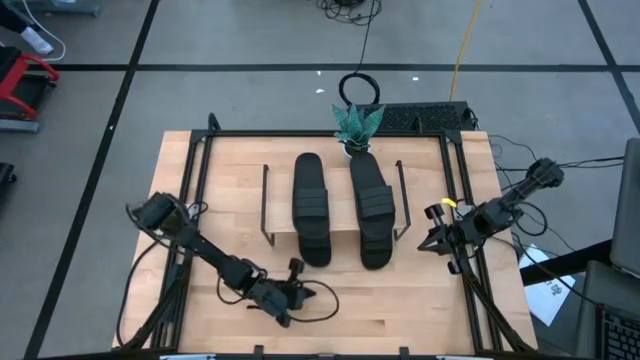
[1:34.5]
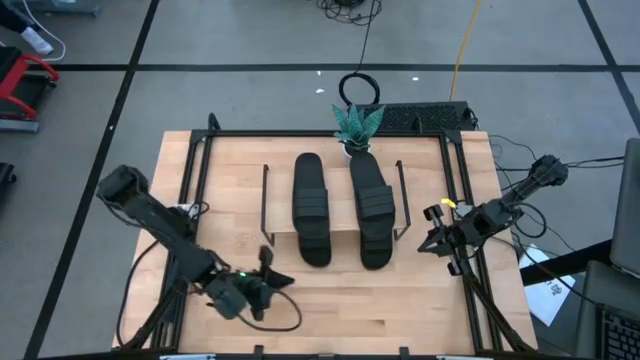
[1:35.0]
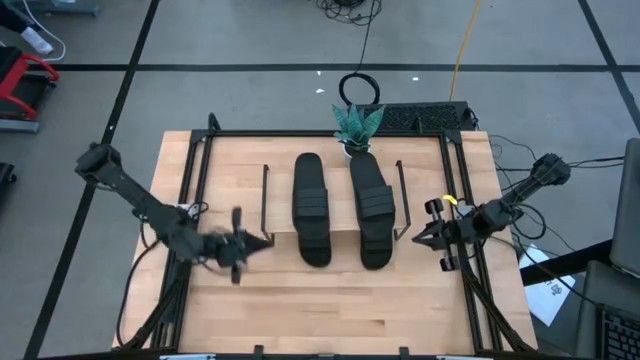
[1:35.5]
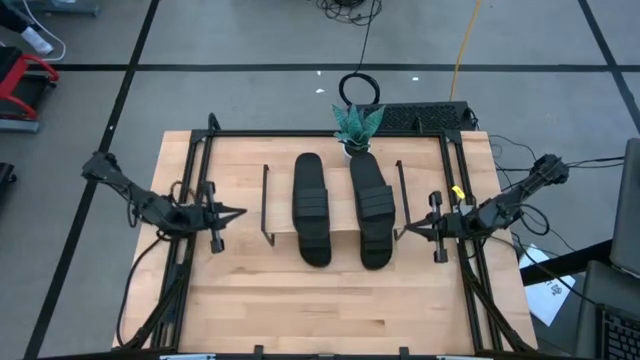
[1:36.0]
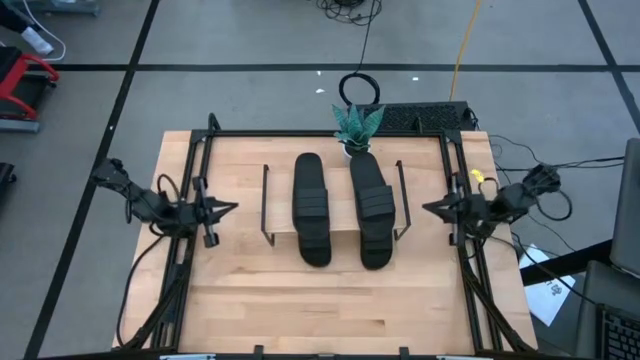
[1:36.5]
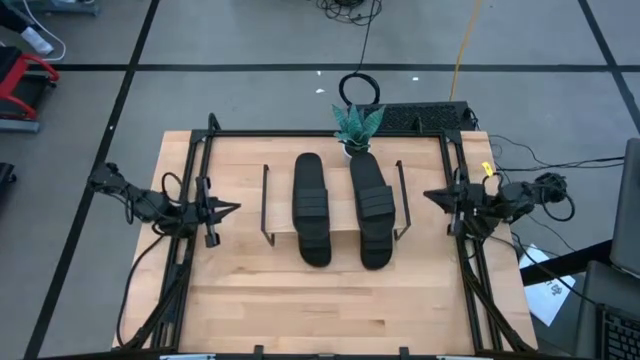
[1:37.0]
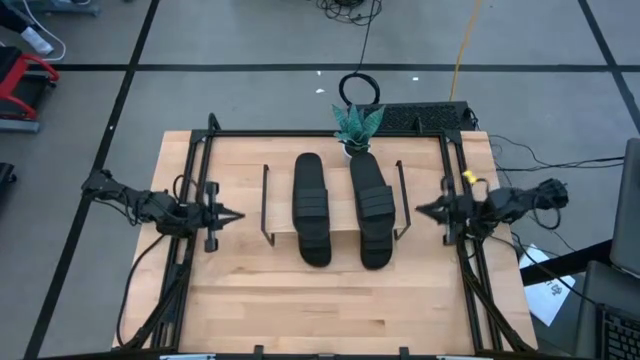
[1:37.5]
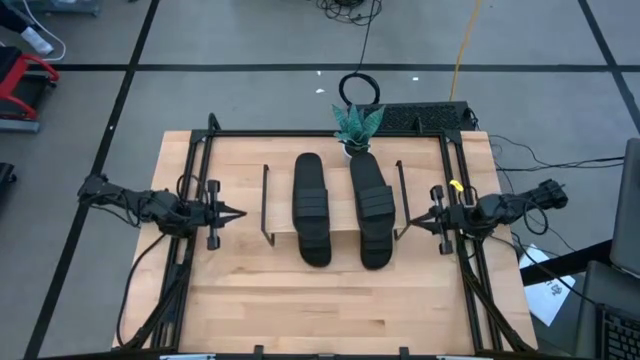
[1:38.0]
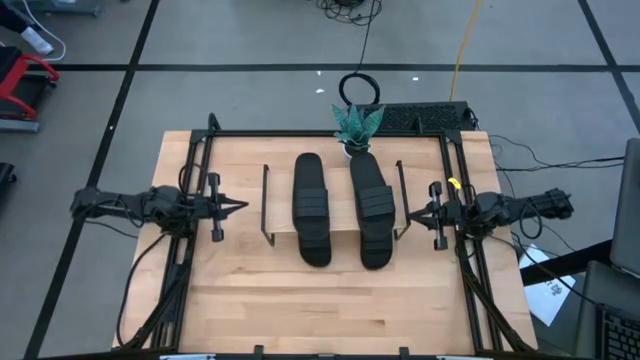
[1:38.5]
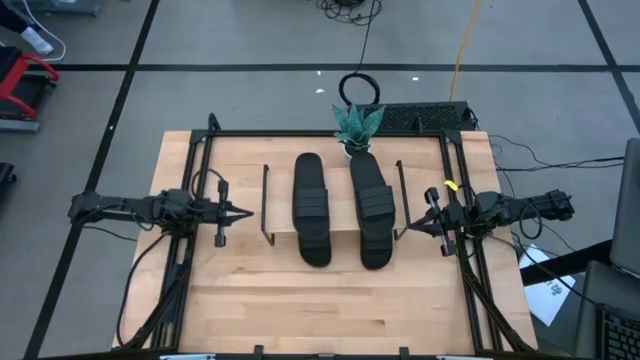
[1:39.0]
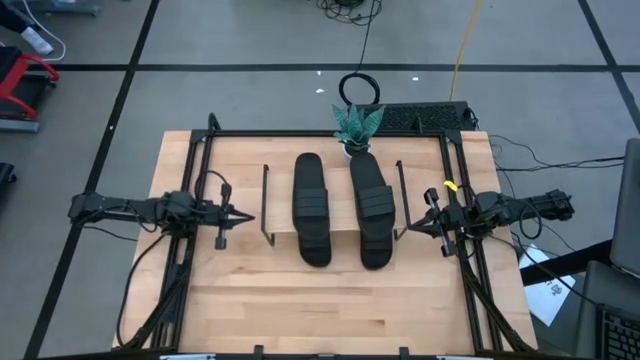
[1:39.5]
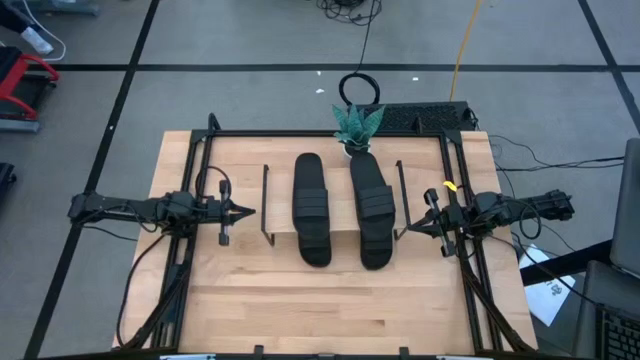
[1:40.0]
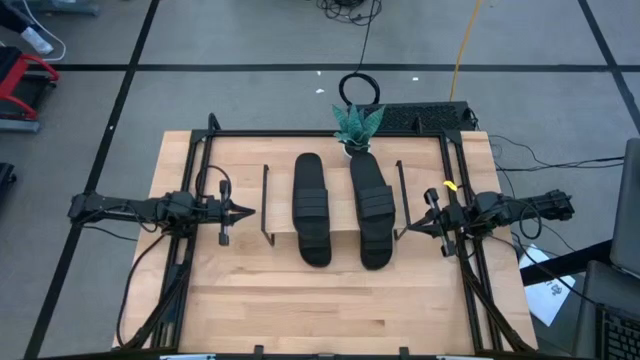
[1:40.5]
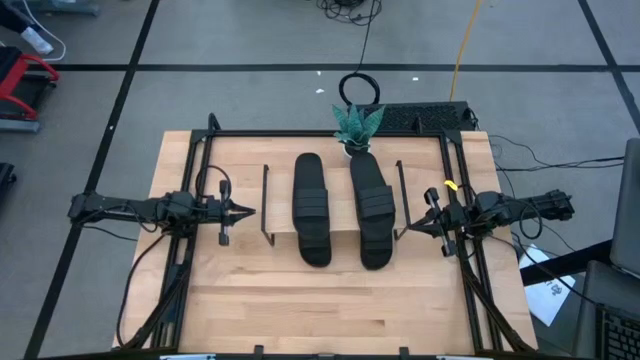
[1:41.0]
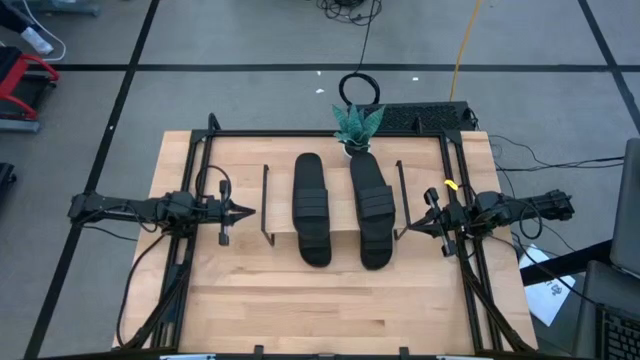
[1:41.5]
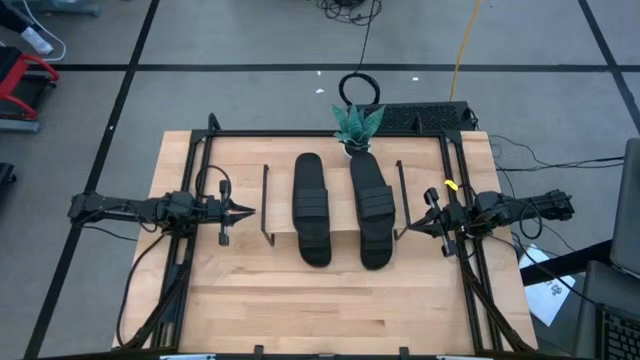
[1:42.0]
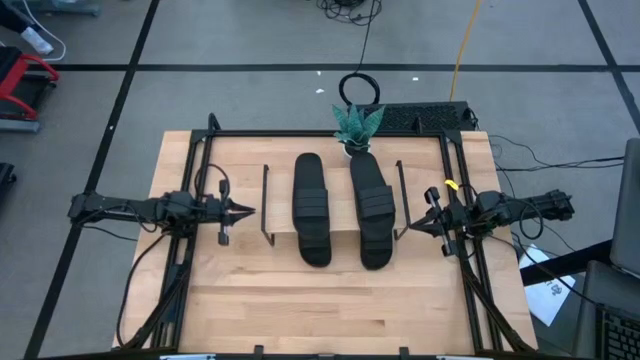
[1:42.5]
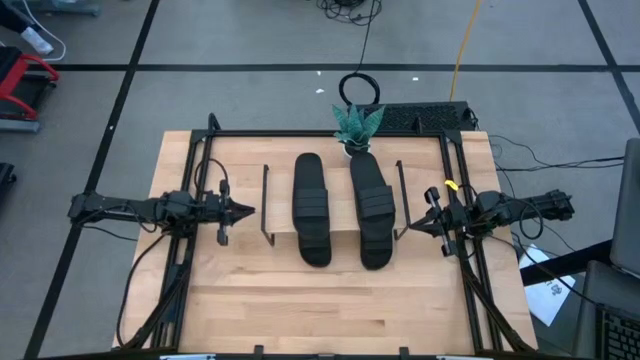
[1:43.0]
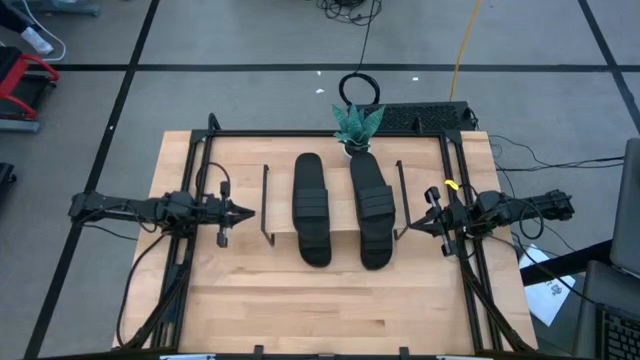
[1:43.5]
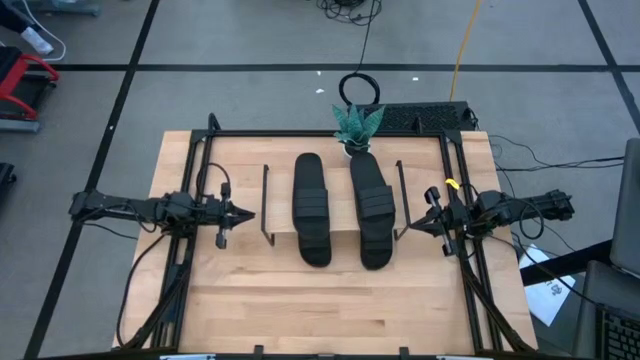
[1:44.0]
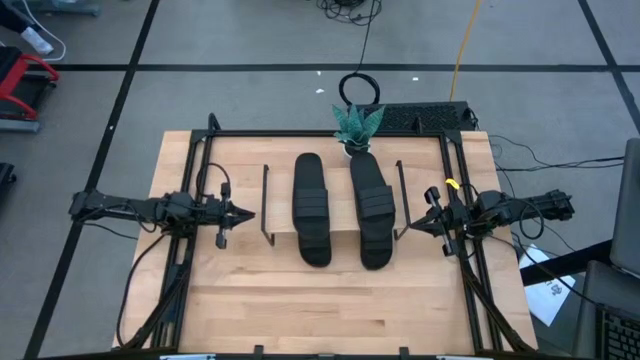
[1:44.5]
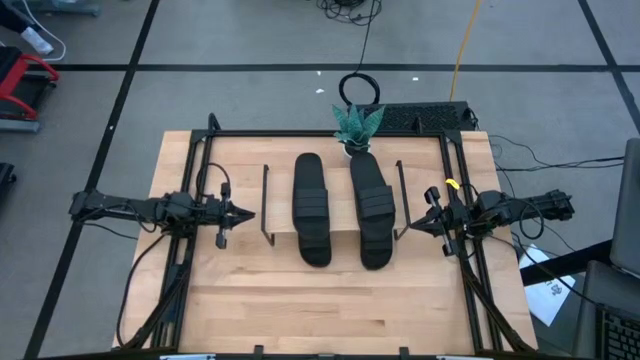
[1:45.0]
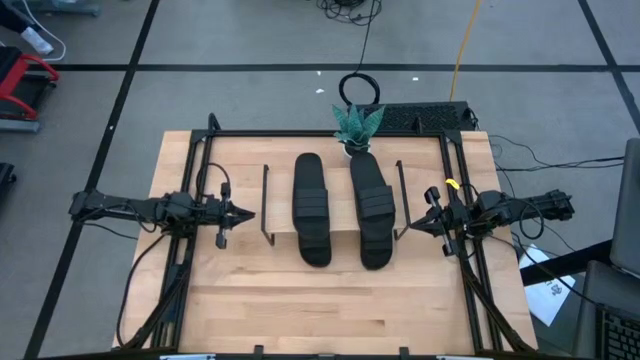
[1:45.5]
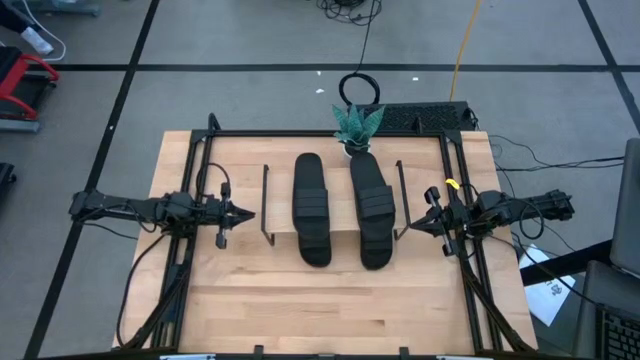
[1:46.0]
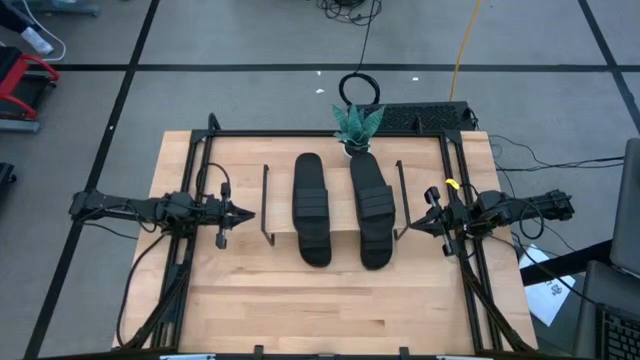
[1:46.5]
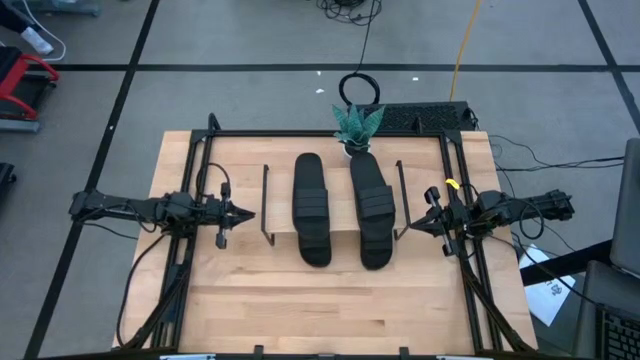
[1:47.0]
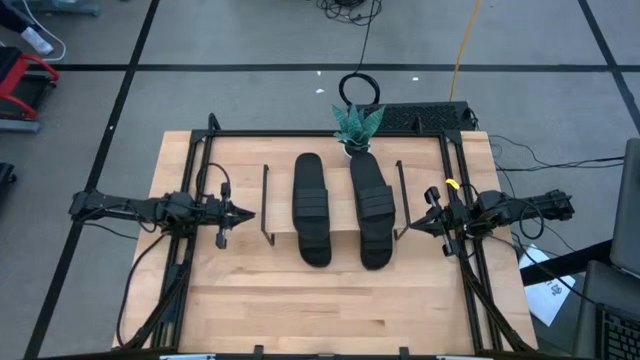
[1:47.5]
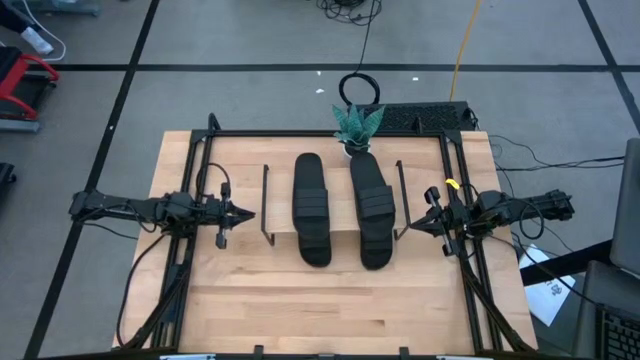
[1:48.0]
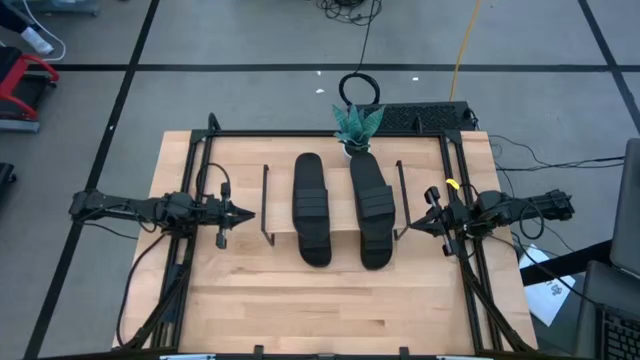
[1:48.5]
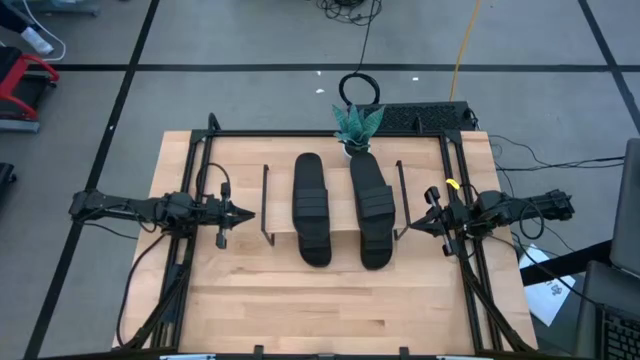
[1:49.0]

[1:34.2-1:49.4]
Task: Pick and place slides into the shelf
Return to Home Position

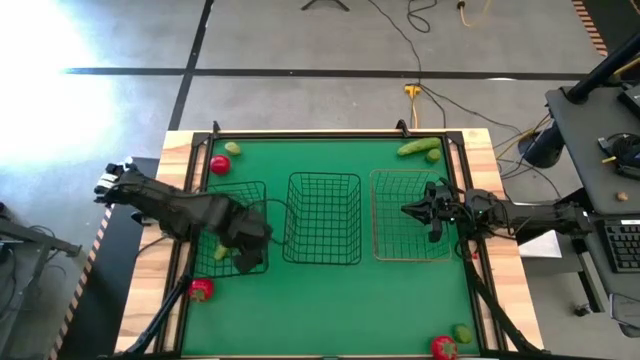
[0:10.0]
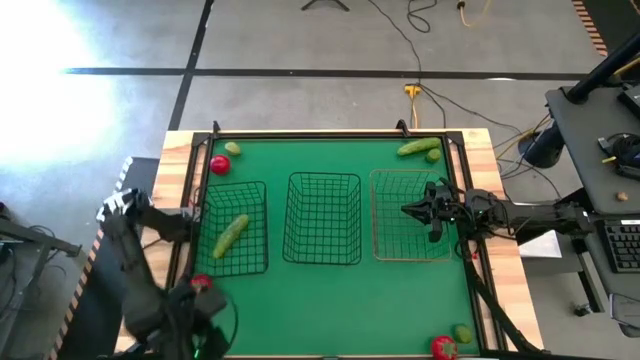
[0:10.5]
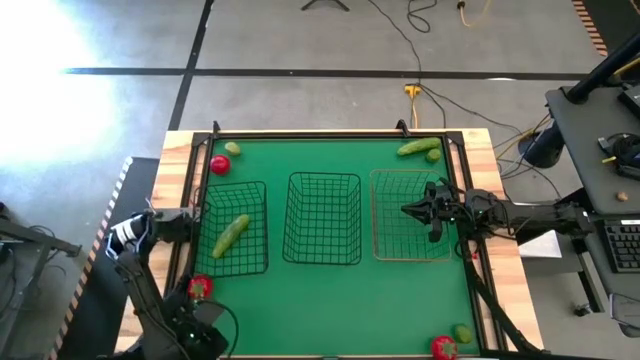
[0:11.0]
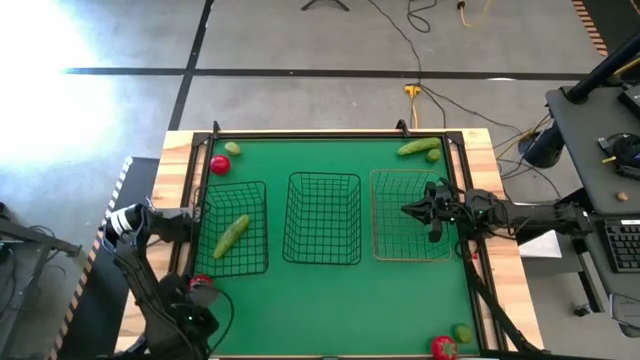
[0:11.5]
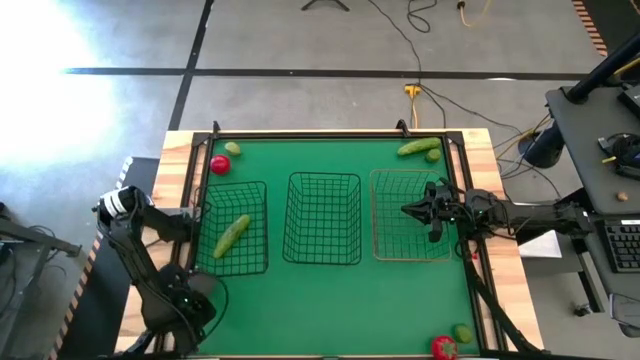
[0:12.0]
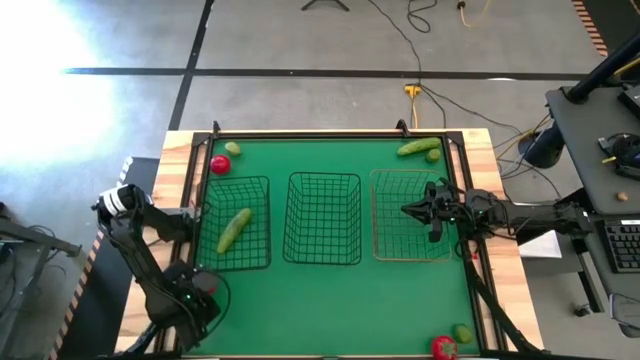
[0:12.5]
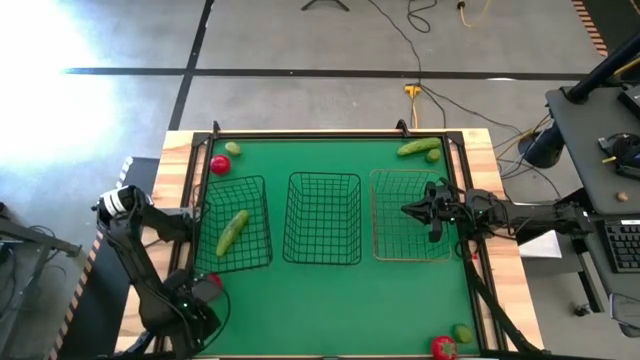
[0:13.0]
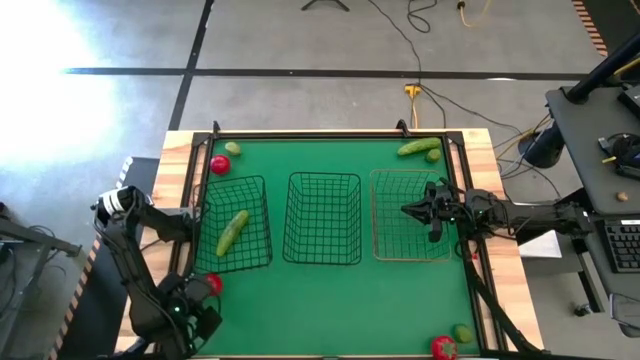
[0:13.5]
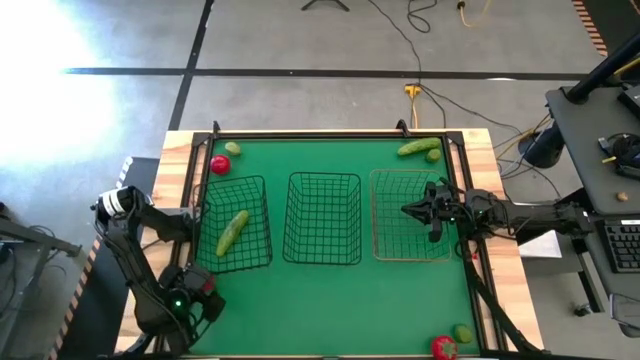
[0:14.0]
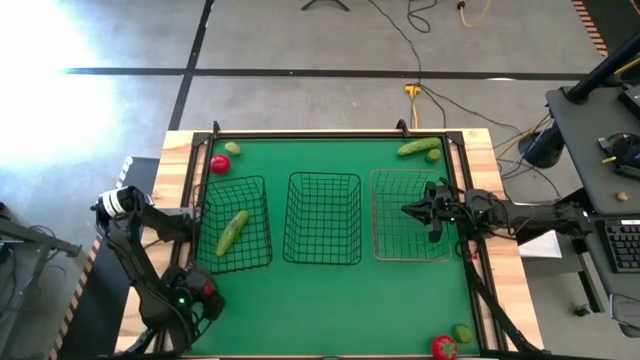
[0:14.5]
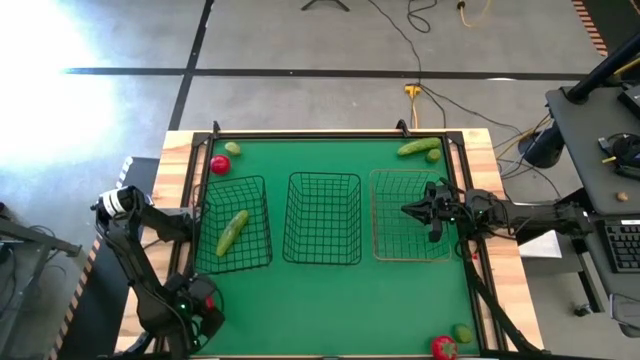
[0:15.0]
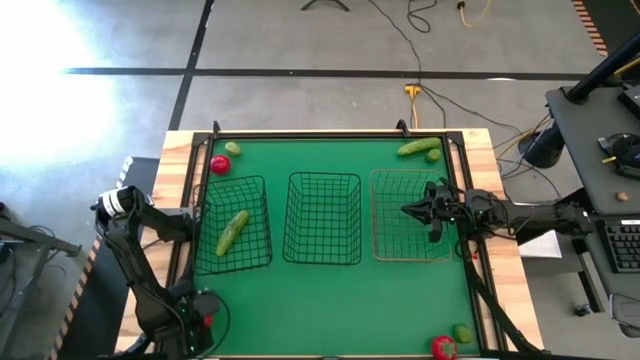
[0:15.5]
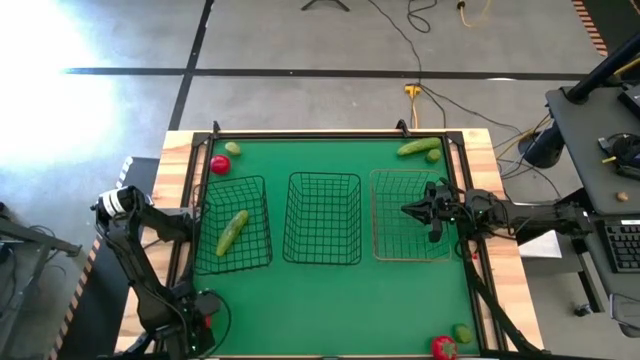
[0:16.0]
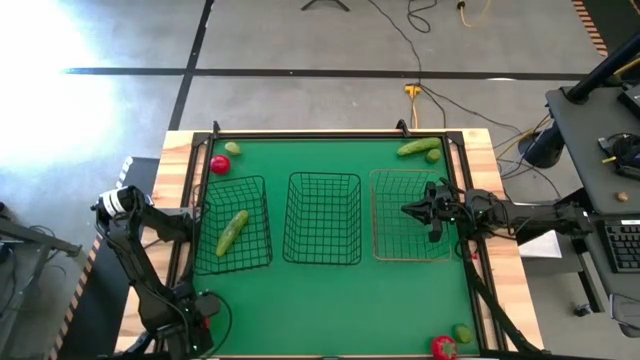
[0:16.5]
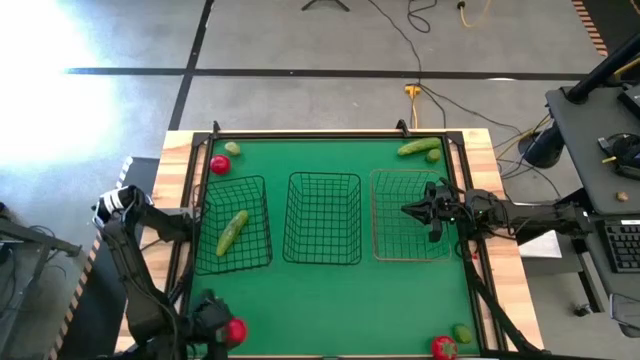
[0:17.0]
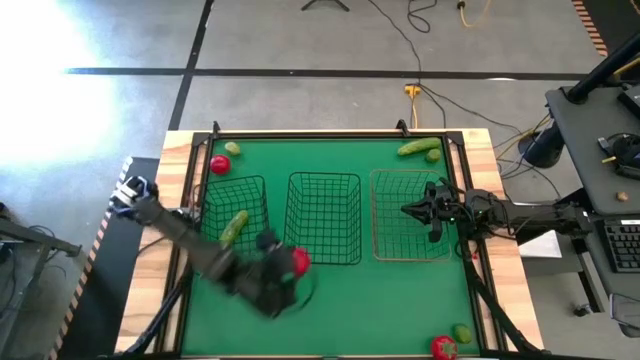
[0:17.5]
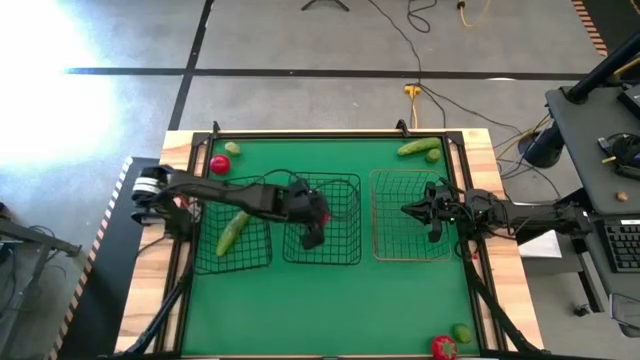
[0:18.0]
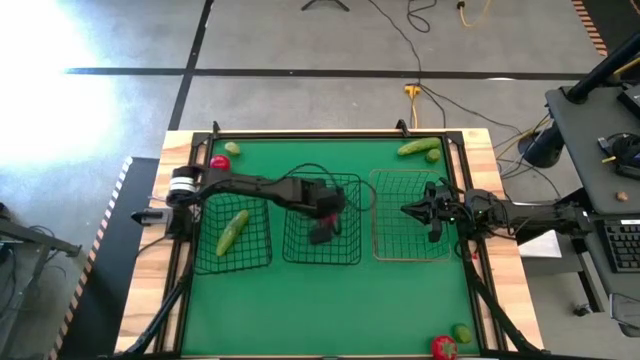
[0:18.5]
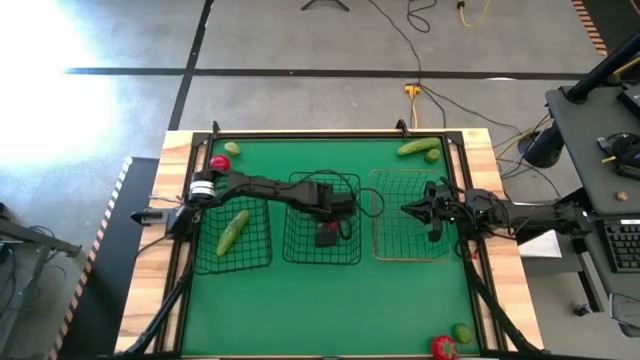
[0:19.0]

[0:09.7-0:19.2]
Task: Sort produce into baskets
Put the middle left tomato into the right black wire basket
